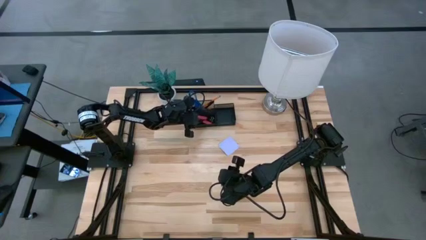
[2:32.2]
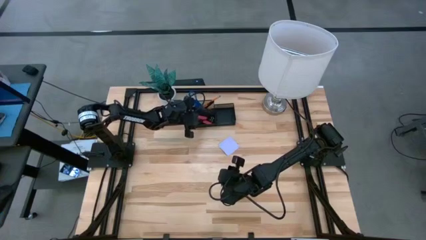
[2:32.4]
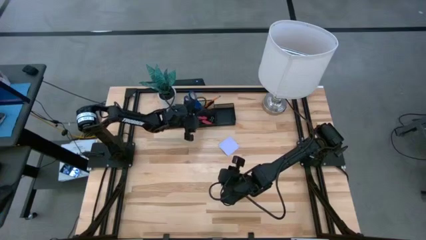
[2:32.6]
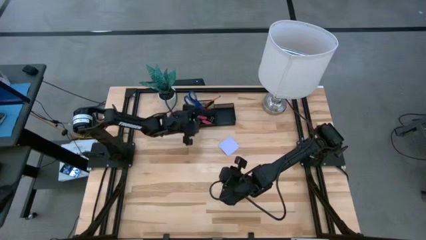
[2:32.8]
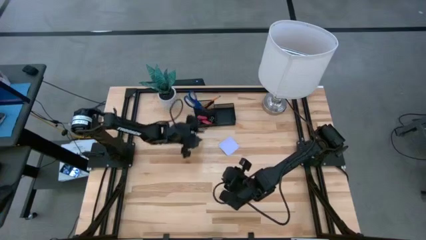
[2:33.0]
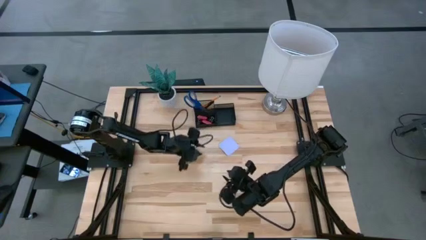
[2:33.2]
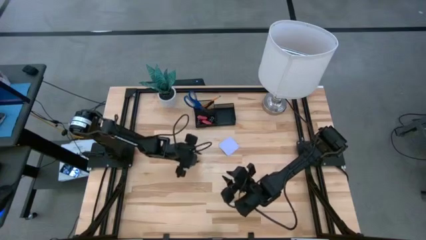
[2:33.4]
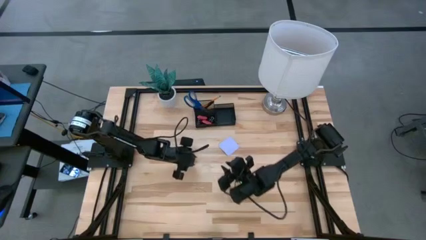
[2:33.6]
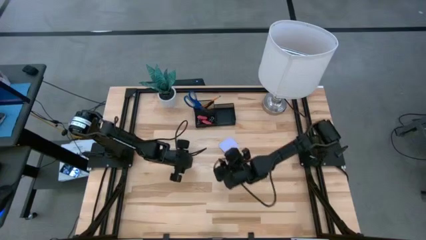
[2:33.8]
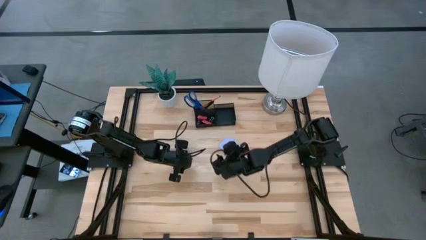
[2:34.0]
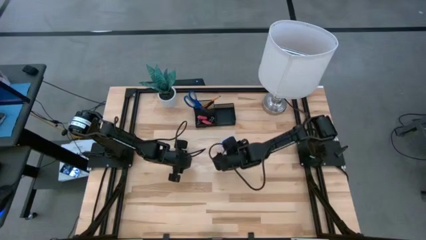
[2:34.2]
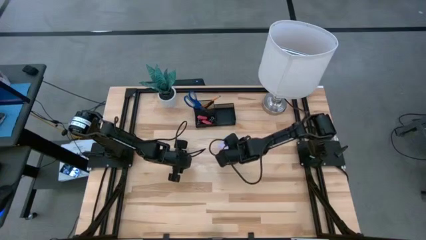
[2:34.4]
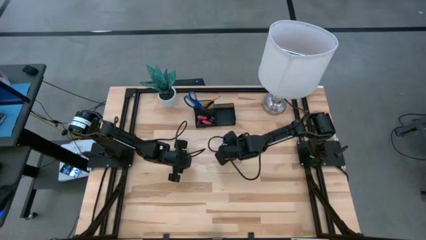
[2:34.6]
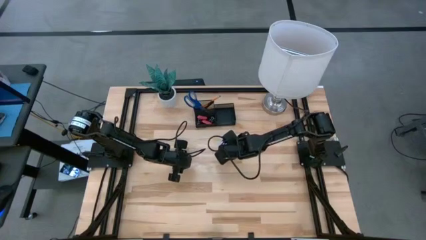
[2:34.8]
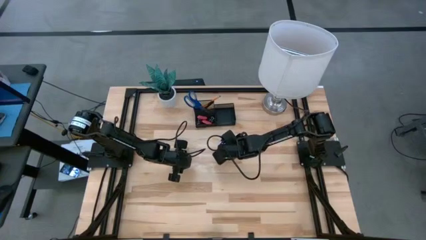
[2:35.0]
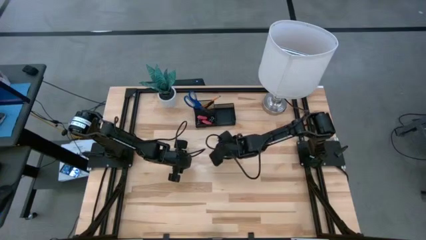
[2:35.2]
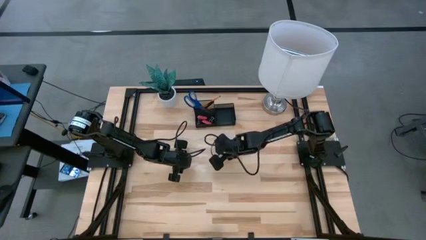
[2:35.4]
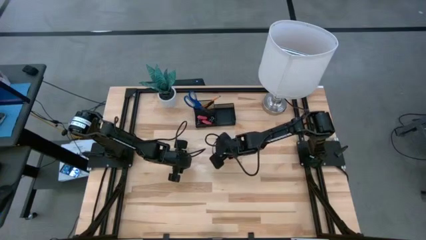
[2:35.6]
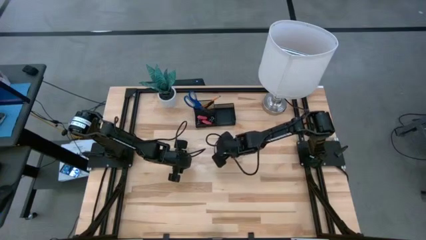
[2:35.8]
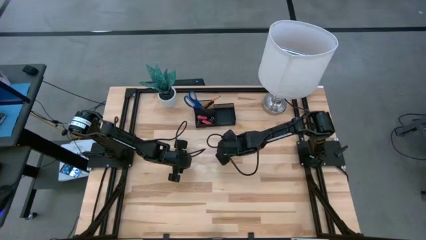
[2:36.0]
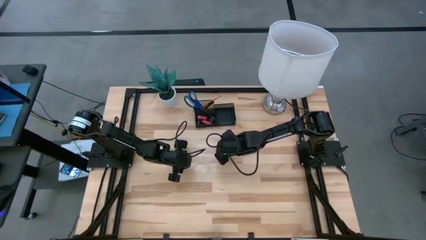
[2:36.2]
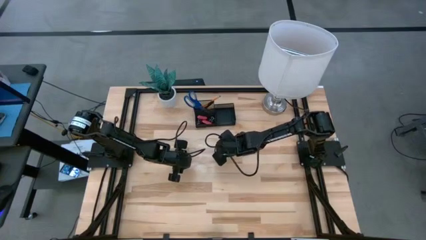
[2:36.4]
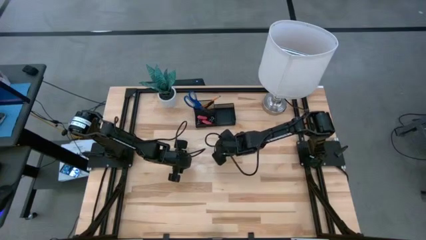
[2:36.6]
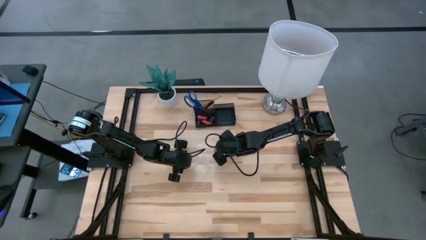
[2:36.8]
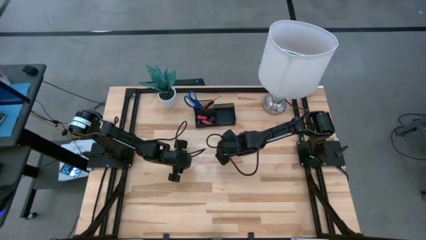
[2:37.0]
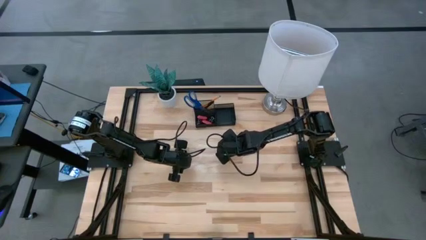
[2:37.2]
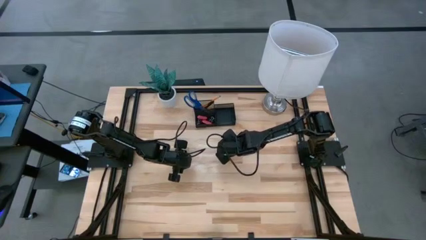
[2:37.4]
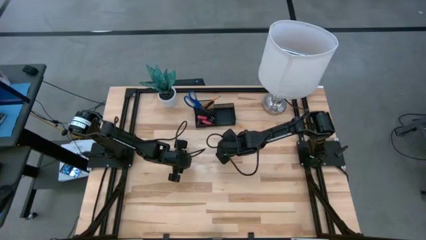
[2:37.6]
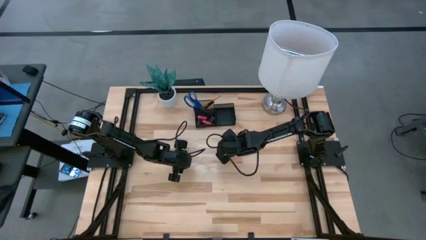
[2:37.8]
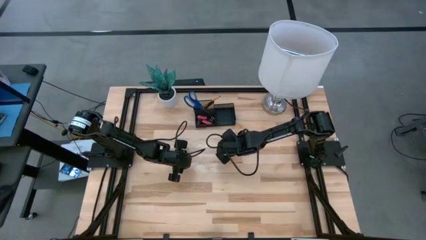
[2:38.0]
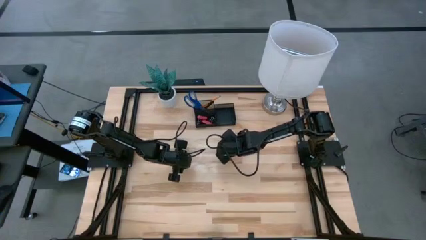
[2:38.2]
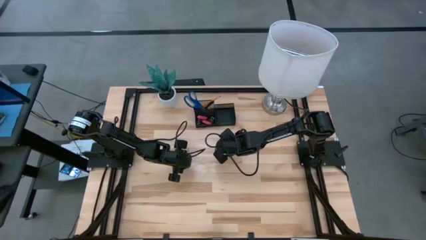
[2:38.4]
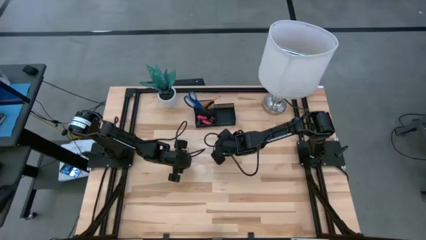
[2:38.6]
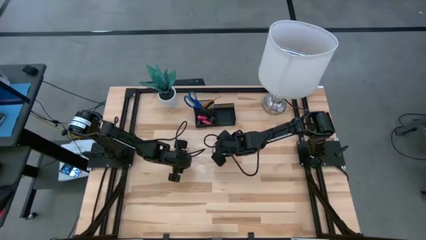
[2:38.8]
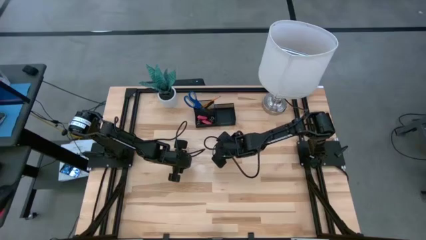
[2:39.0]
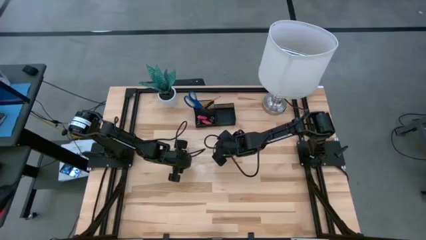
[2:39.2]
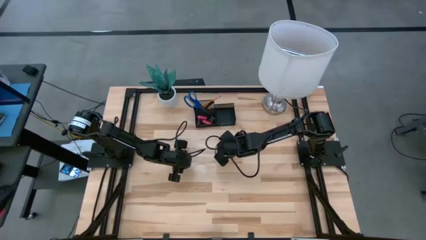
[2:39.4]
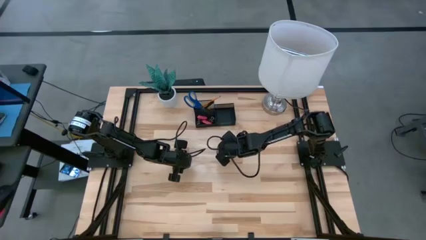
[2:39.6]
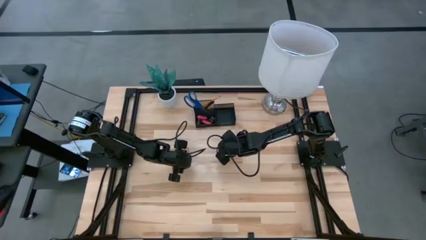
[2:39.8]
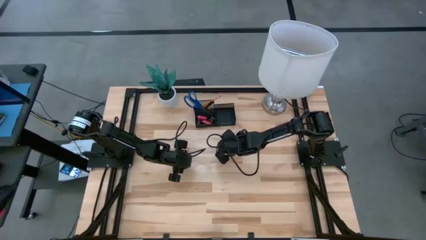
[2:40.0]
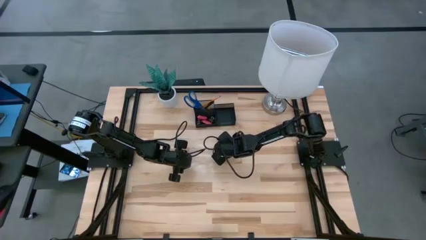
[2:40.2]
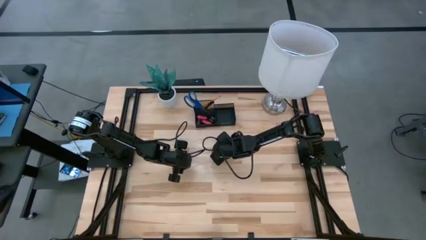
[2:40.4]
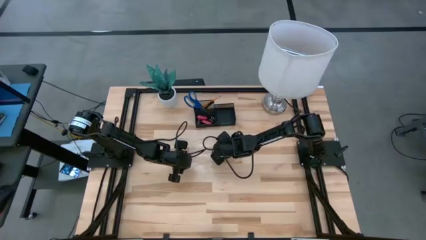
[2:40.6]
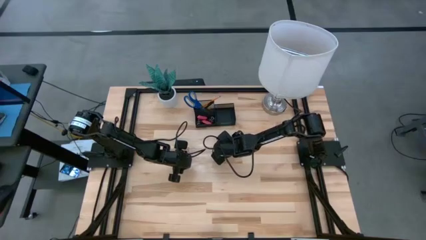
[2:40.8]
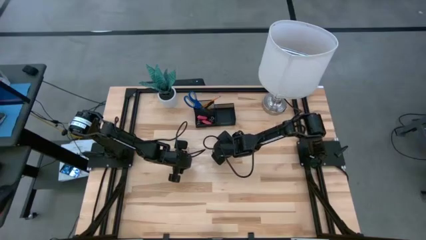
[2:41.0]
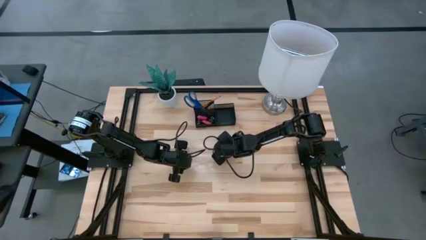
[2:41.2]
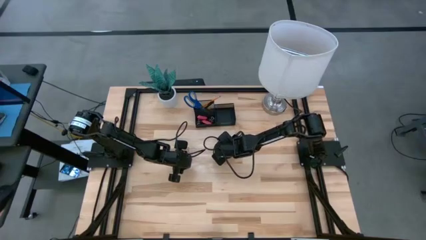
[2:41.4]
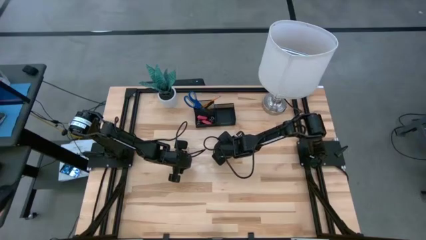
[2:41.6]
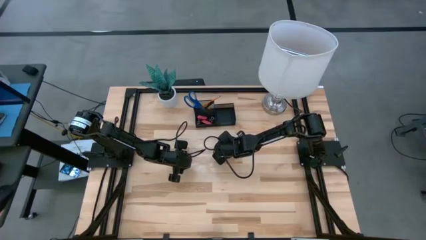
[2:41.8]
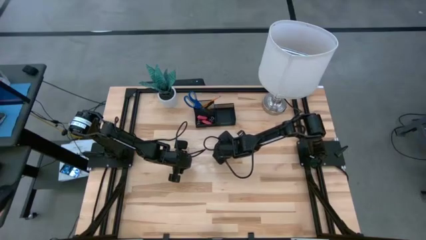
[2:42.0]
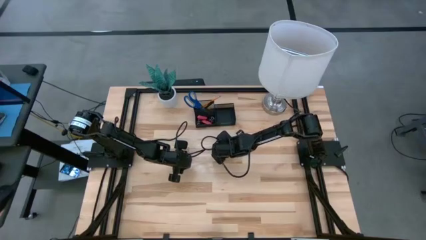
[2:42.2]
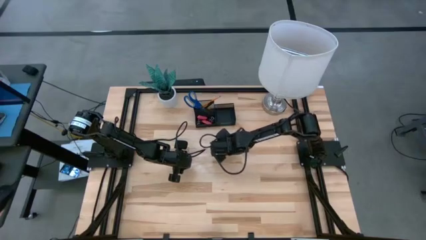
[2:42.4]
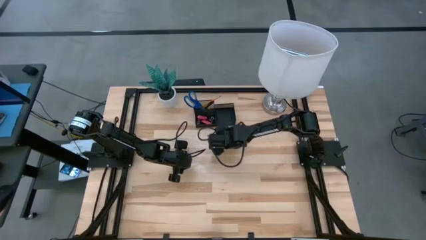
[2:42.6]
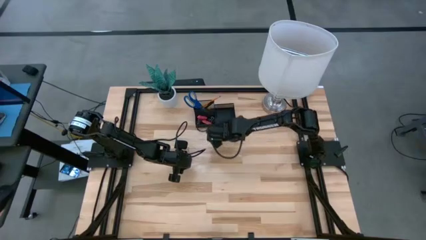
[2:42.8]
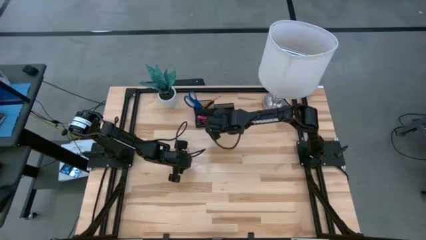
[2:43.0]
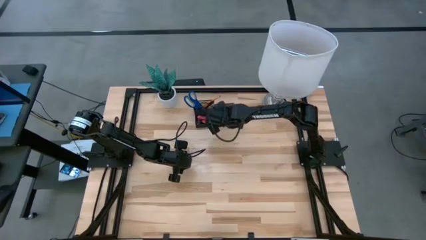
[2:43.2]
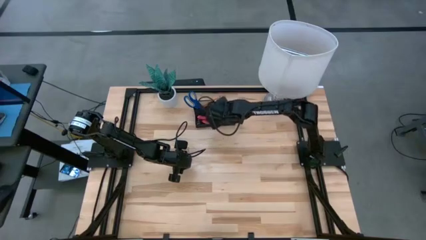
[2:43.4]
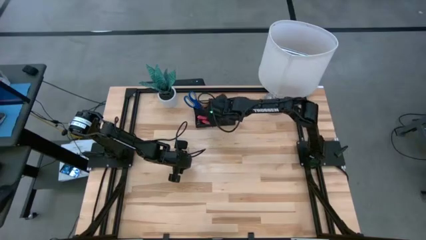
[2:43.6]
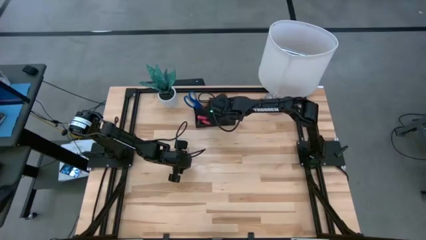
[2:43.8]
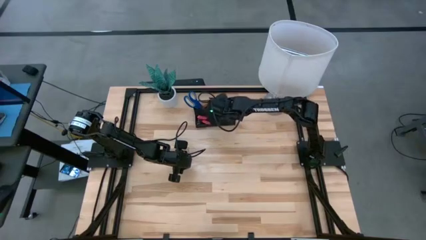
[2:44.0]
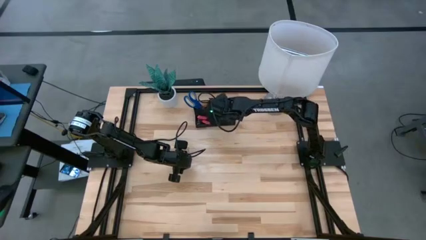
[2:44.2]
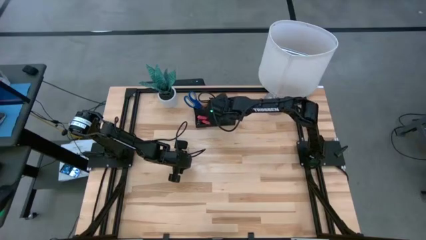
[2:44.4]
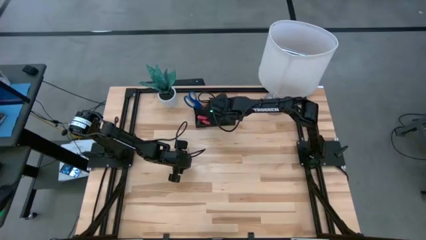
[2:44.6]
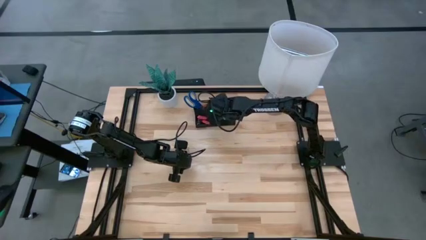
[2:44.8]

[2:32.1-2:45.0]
Task: Pick and place office supplies into organizer
Put the purple sticky notes into the black desk organizer
